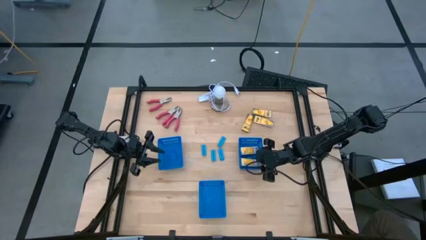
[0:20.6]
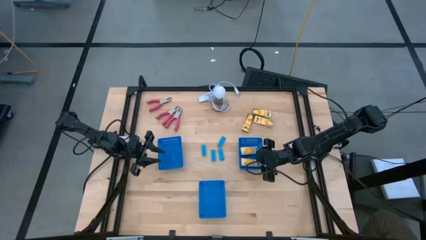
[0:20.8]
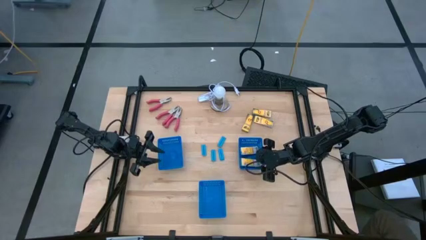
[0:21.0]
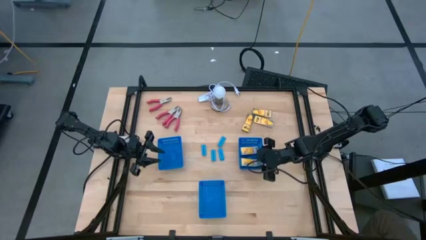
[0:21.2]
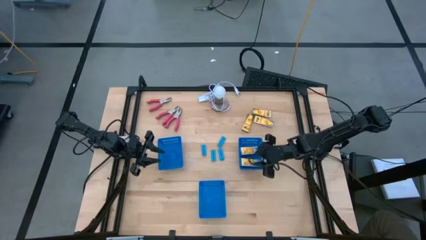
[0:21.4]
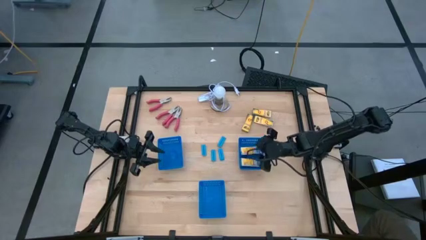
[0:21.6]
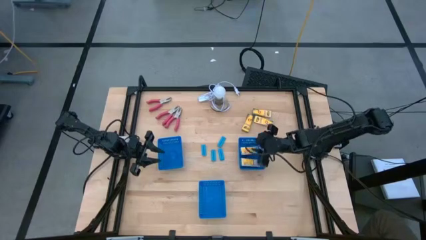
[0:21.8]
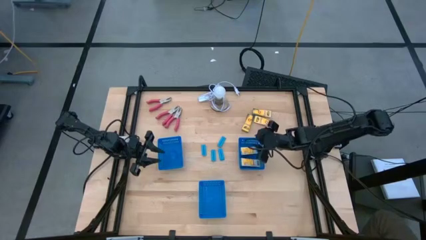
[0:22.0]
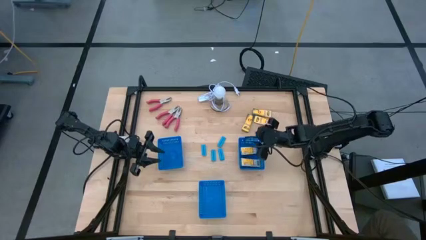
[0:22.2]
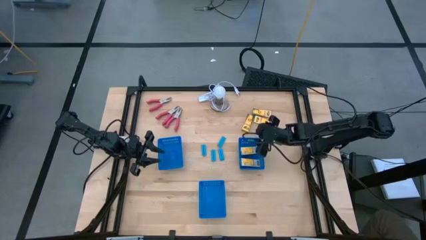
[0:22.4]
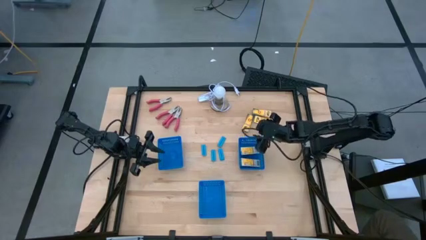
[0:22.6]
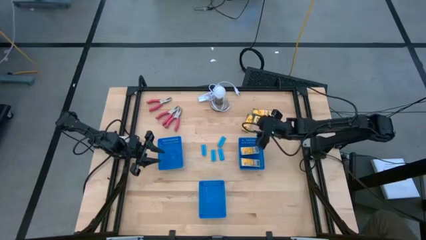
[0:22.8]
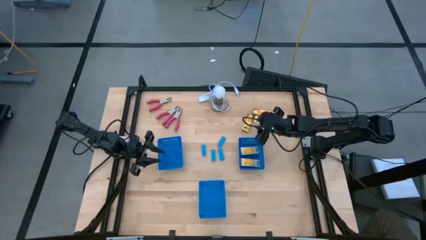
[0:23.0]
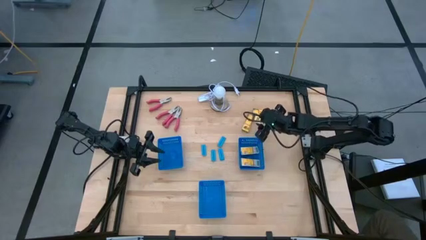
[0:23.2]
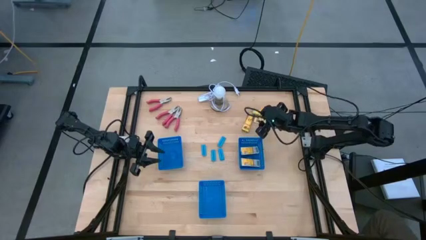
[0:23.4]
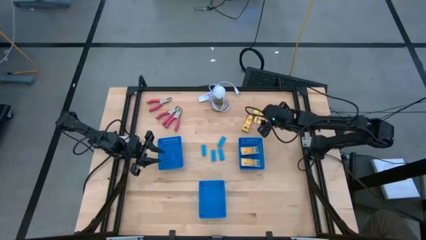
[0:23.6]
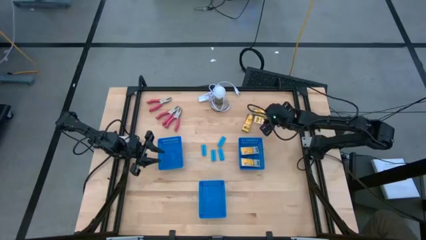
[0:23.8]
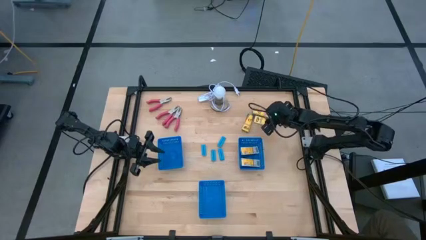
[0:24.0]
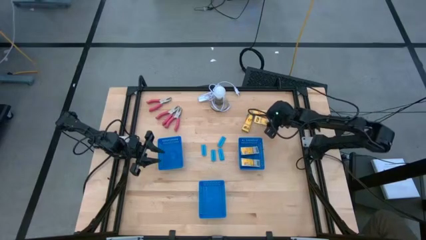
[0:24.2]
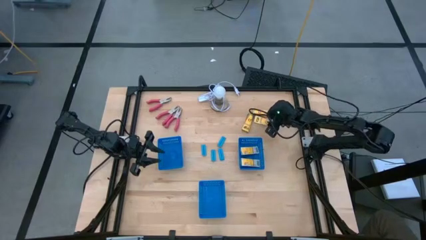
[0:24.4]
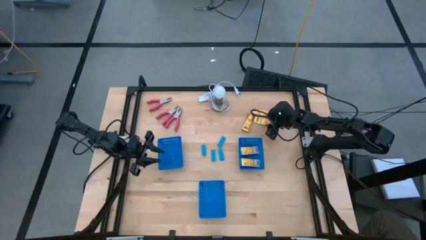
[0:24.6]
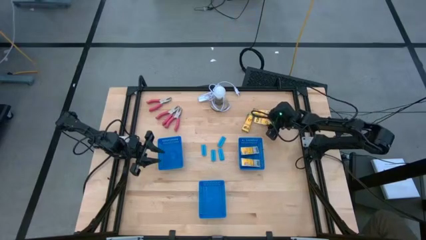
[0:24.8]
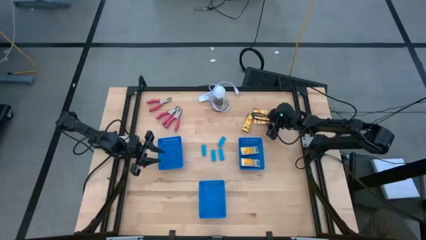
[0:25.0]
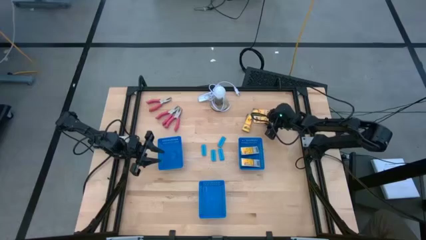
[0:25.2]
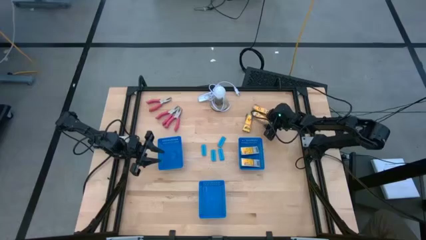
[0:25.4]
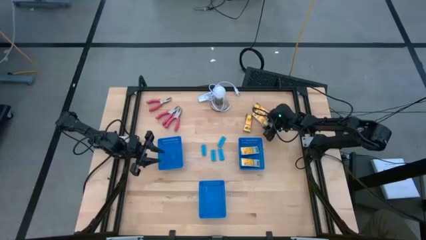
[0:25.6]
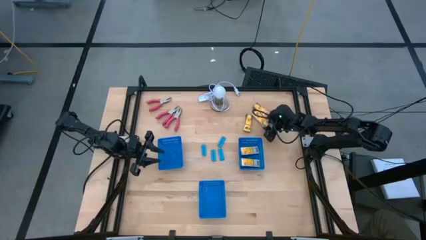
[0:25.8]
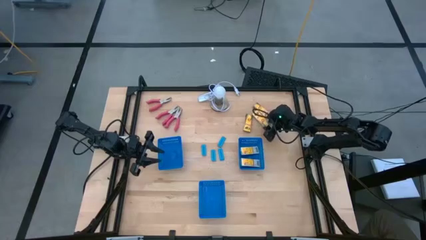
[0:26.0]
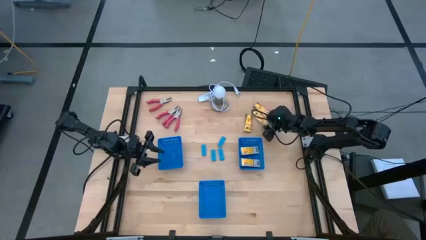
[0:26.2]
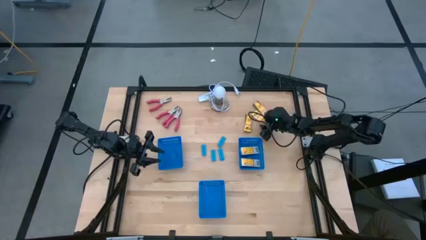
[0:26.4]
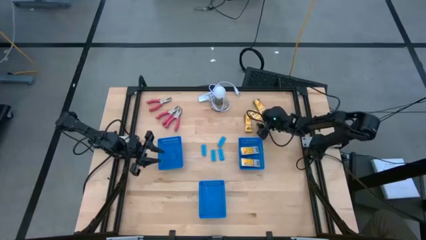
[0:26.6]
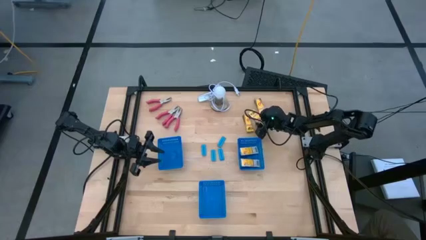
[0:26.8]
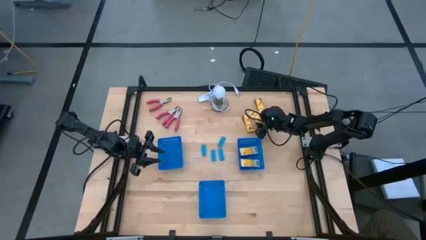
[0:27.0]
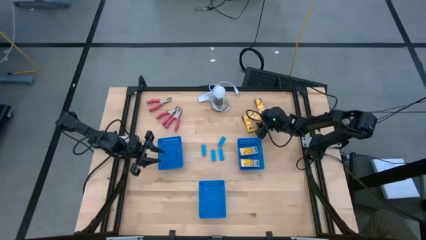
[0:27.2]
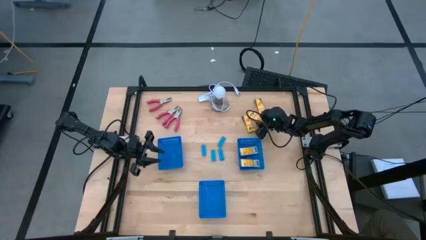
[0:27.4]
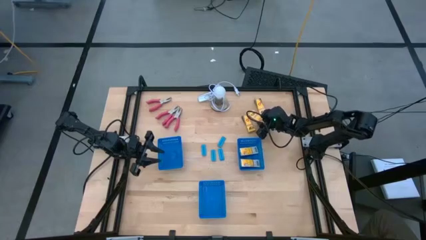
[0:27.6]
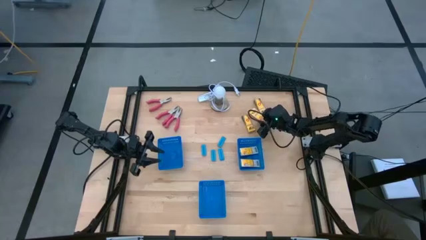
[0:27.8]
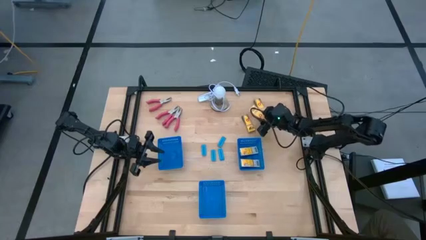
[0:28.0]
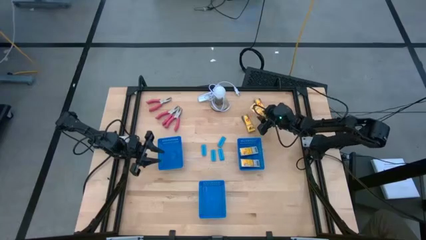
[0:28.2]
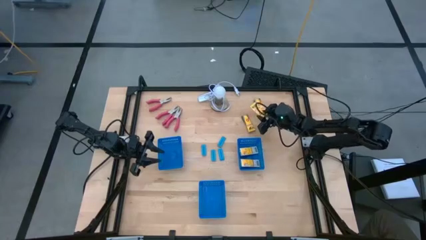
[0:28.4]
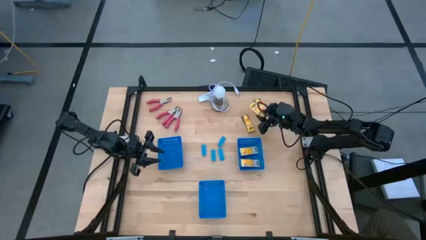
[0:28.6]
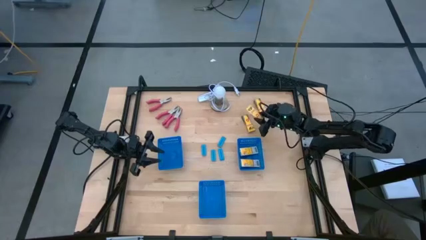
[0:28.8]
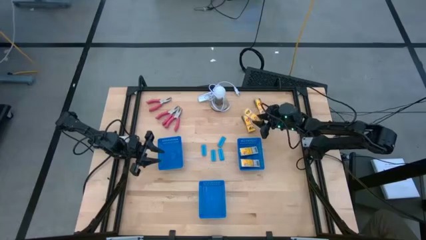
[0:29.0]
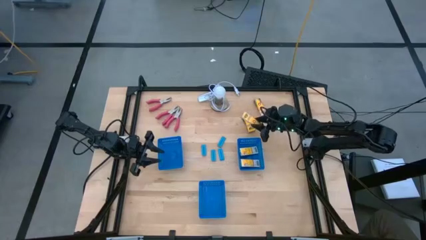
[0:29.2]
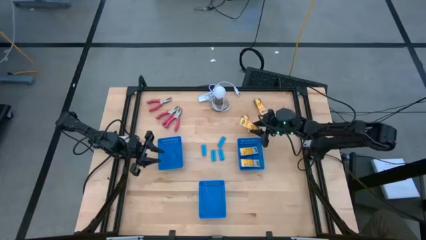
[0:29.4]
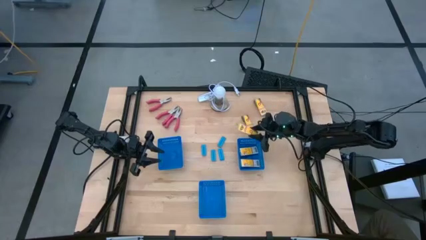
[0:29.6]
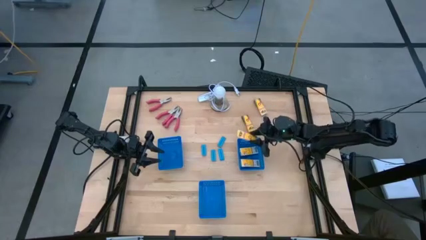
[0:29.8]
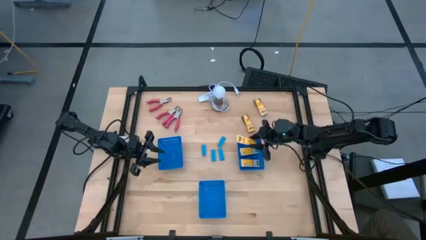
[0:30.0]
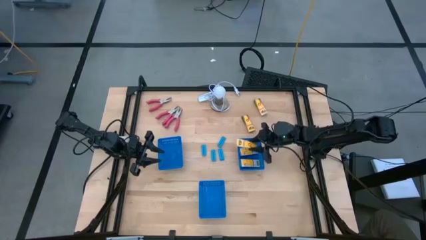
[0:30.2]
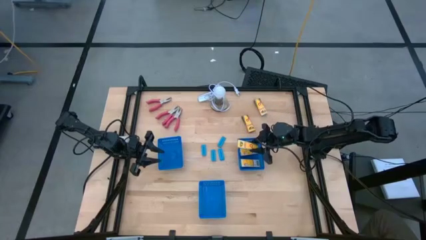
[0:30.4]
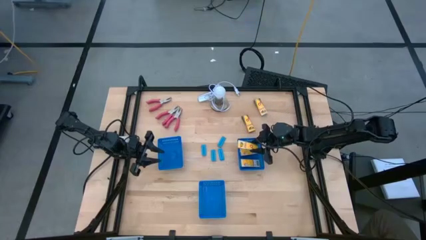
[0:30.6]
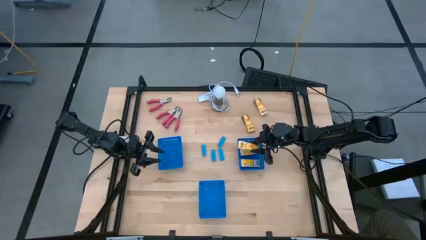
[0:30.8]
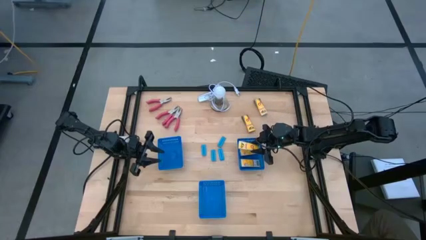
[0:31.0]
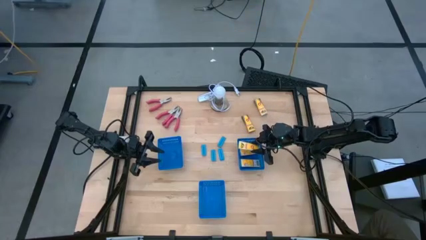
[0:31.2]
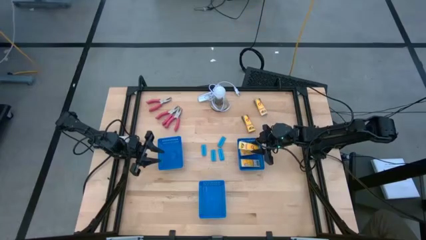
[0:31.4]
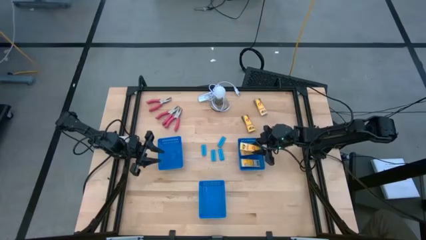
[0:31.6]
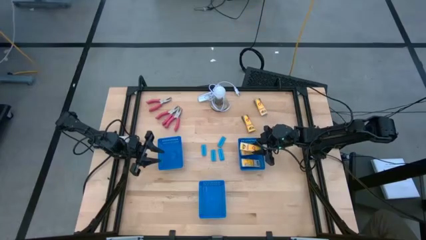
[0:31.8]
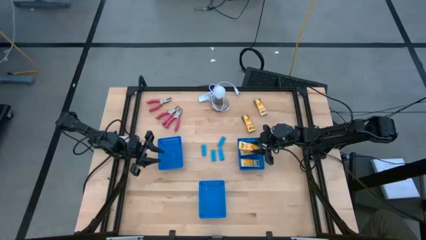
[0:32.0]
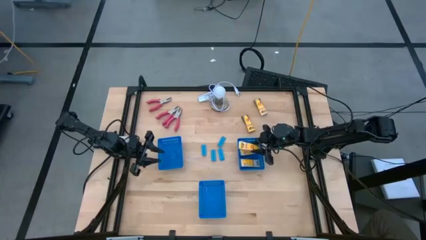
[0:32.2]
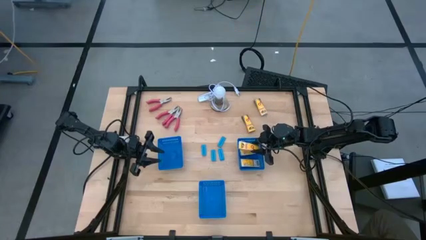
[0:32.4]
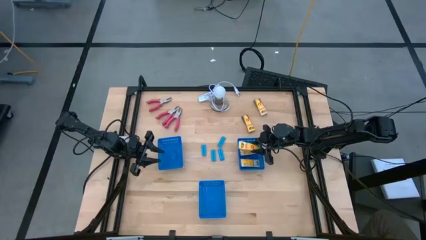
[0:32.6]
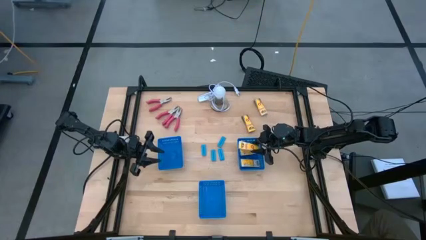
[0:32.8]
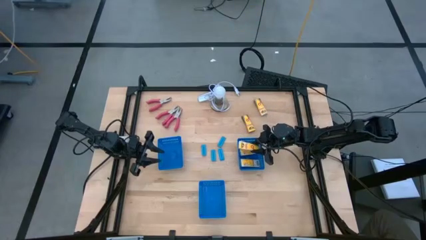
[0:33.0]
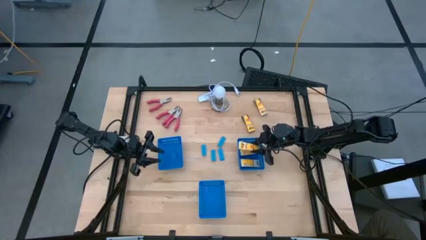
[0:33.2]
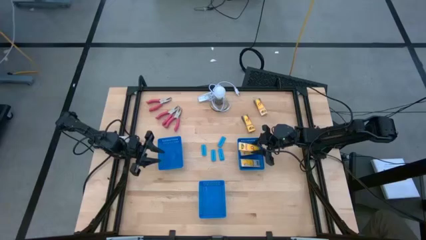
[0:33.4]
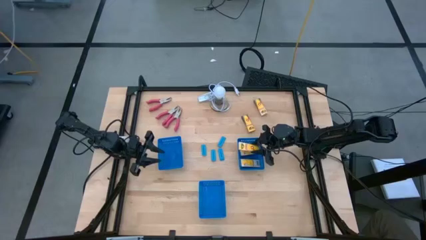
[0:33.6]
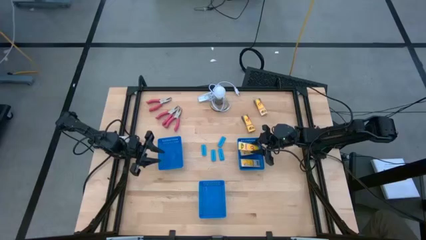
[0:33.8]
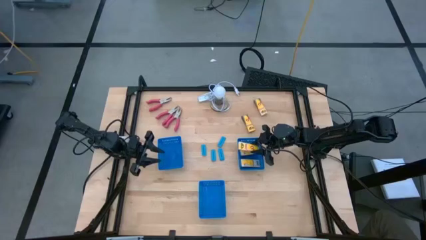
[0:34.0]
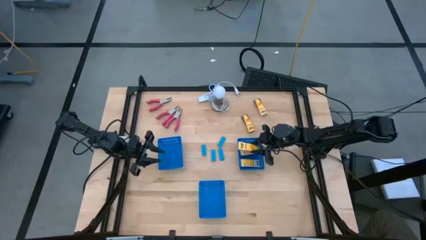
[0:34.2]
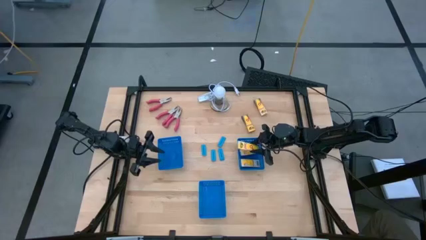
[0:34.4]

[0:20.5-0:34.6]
Task: Pick & Place School Supplies
Put the yellow crayon box into the top right blue bin
